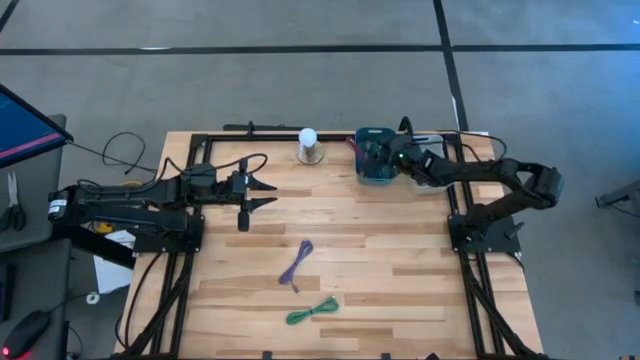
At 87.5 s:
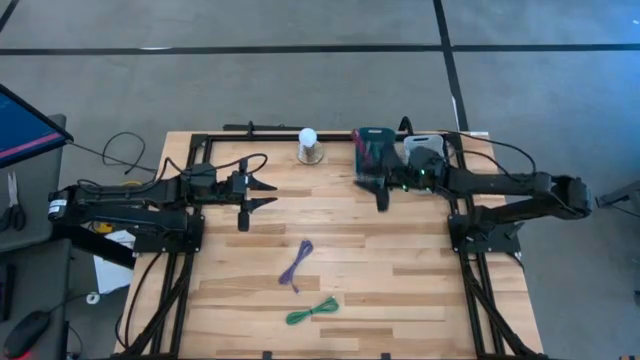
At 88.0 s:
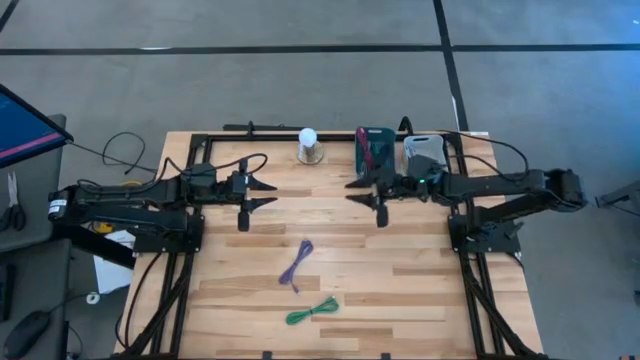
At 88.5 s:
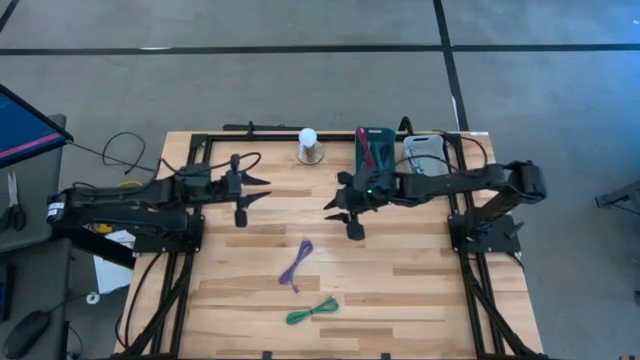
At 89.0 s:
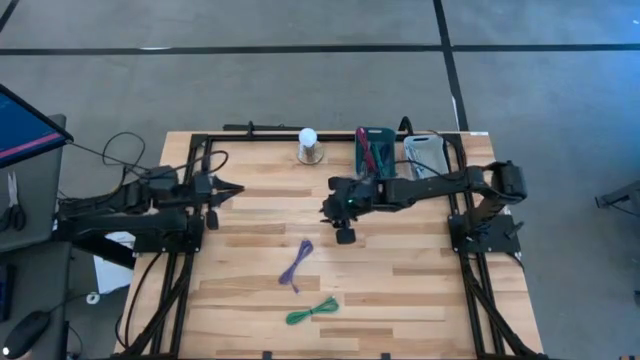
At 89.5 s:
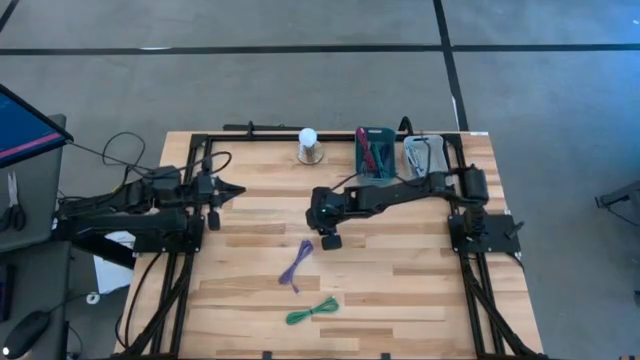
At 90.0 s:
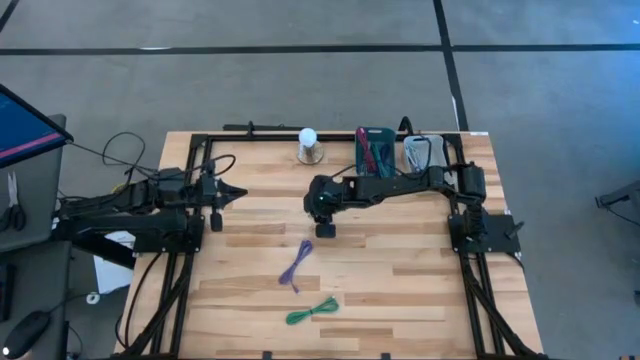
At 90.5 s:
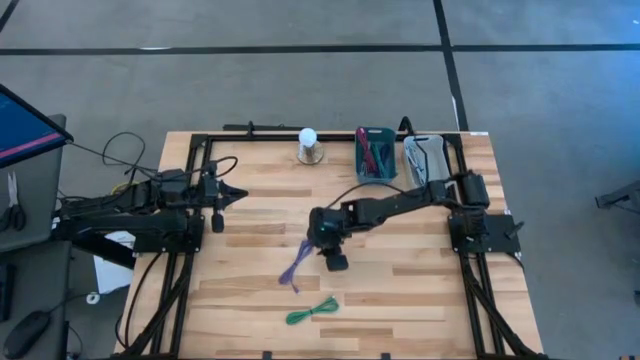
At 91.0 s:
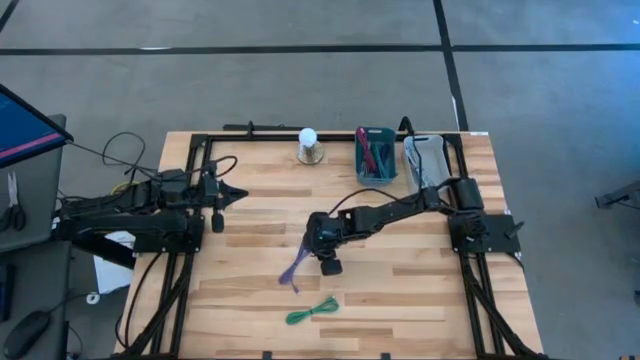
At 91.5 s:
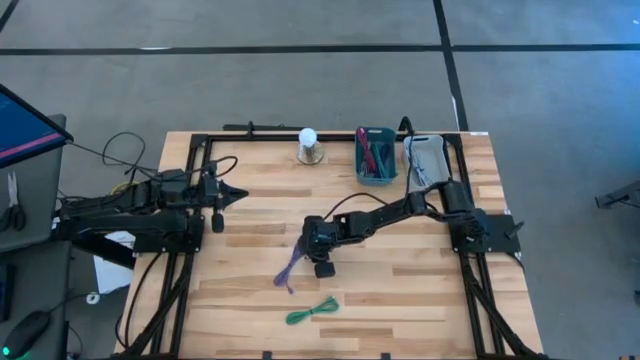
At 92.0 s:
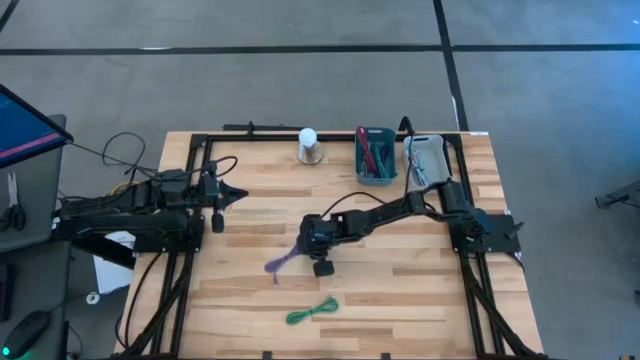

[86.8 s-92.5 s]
Task: Pick & Place USB Port
Put the purple charger cable into the gray bin

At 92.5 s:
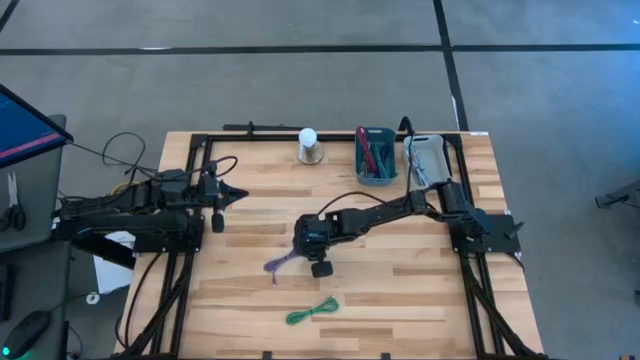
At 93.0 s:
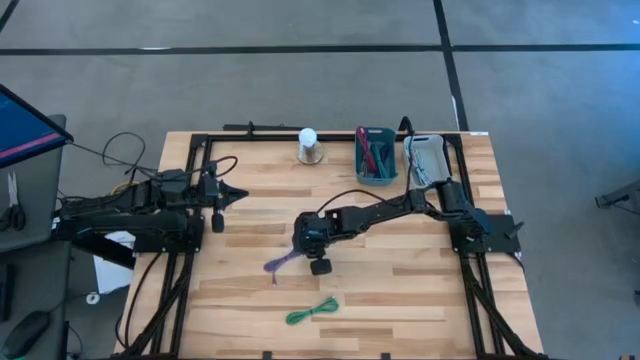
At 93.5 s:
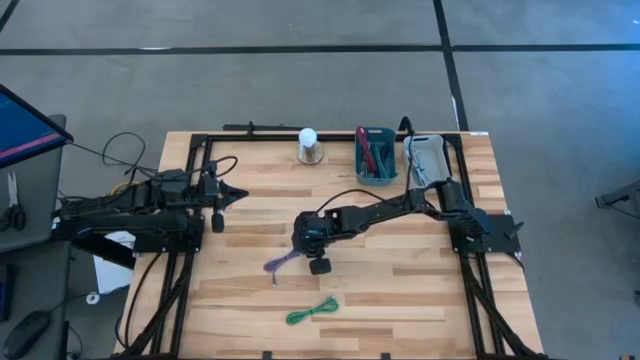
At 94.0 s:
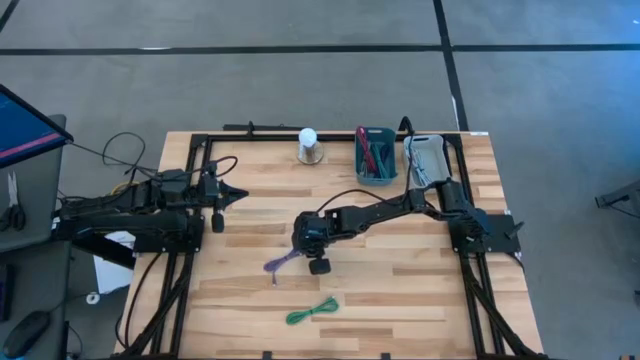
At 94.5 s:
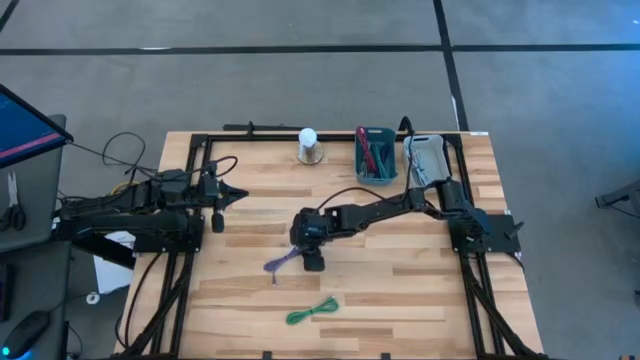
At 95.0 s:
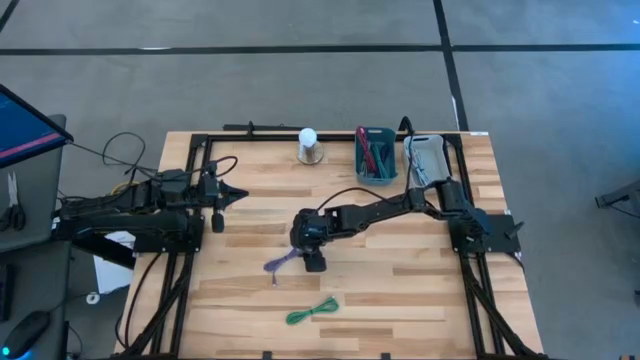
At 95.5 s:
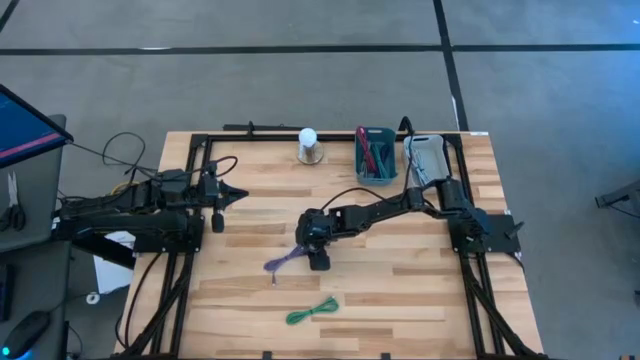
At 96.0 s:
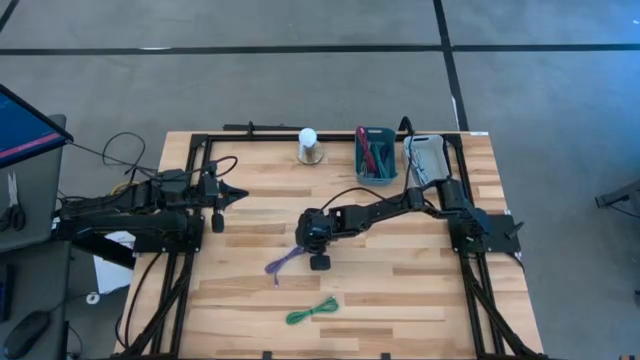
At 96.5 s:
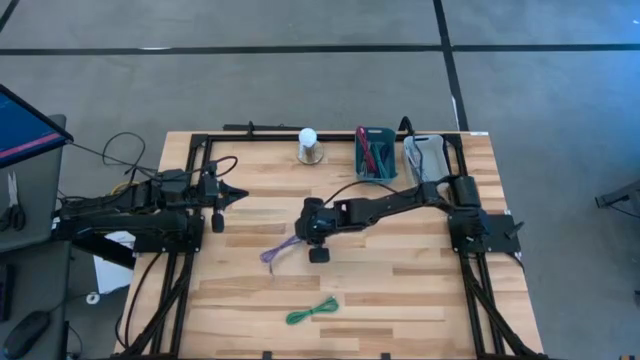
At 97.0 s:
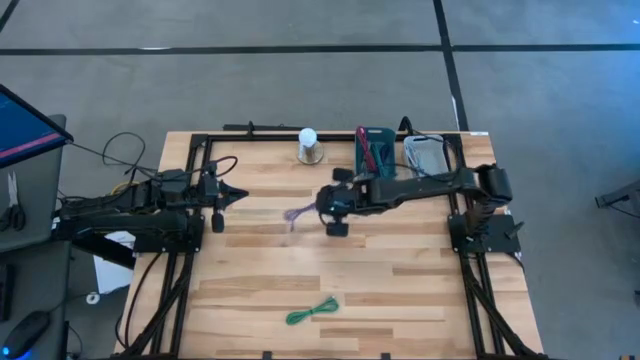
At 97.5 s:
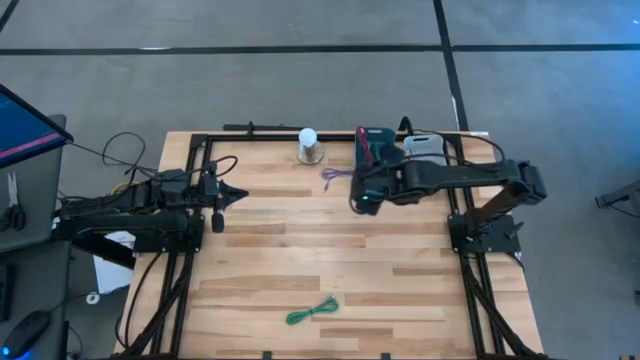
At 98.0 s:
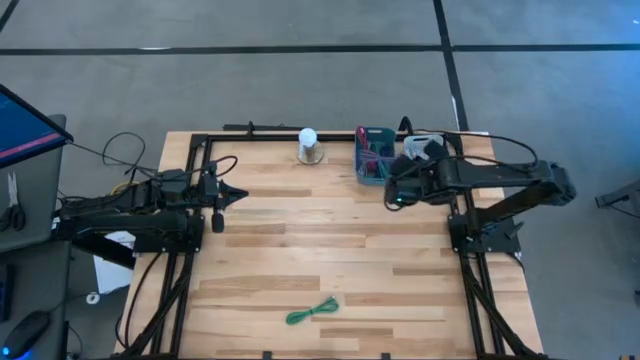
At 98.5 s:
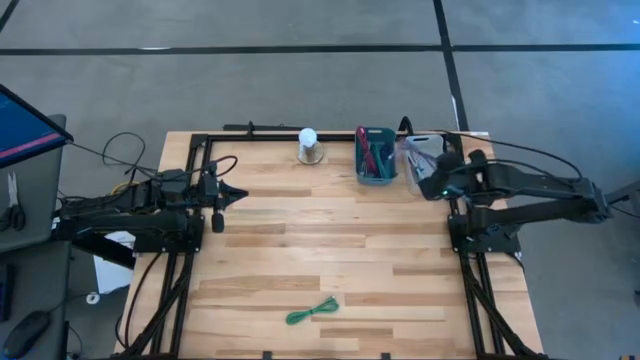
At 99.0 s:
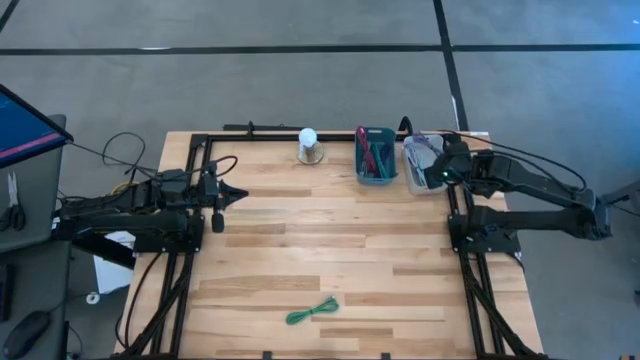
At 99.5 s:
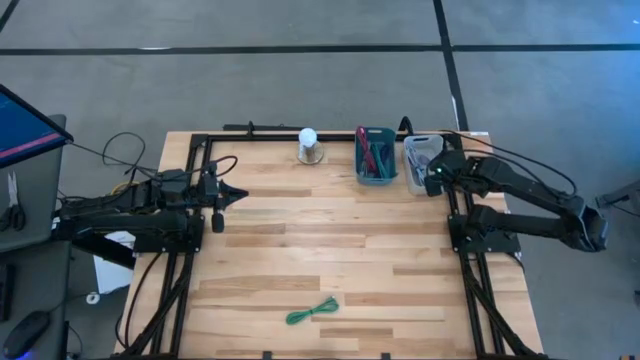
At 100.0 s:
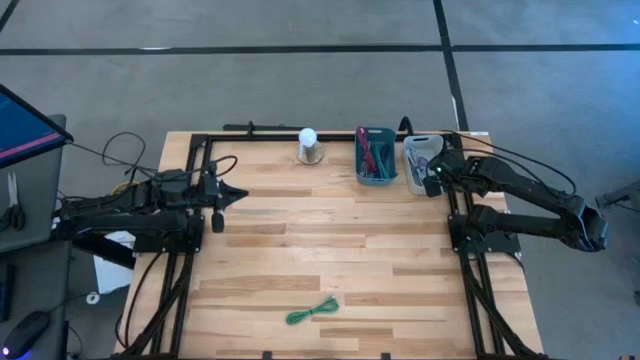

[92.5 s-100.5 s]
Put the purple charger cable into the gray bin

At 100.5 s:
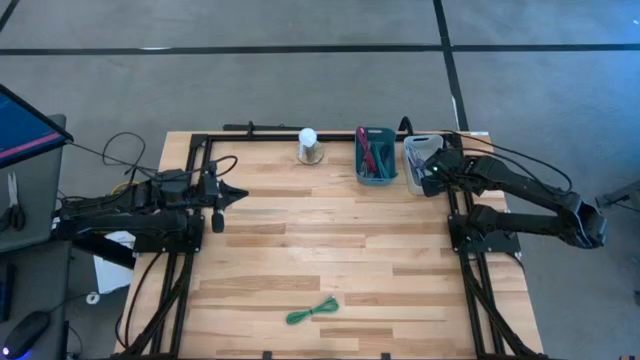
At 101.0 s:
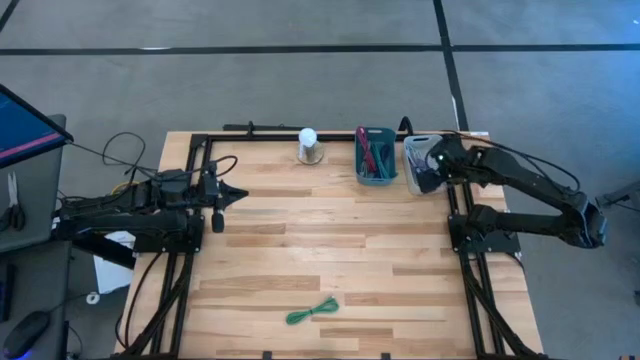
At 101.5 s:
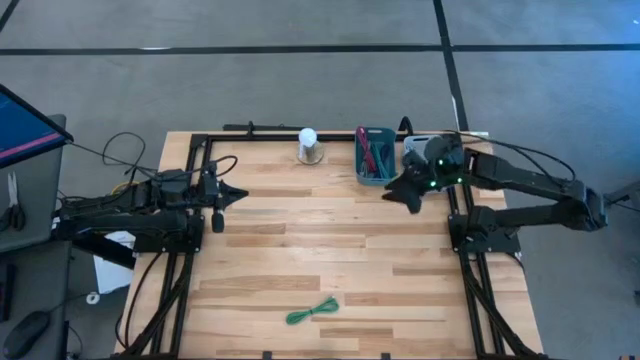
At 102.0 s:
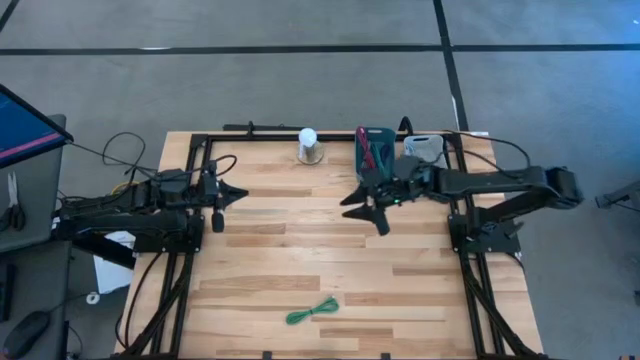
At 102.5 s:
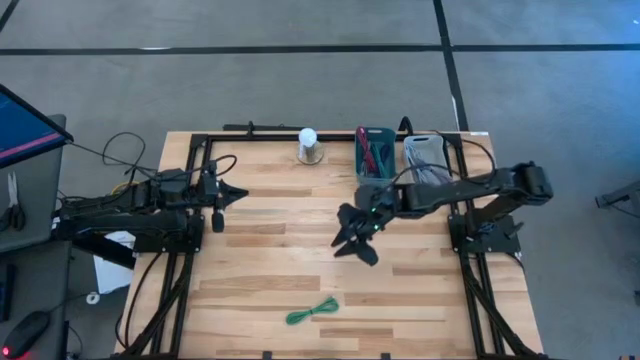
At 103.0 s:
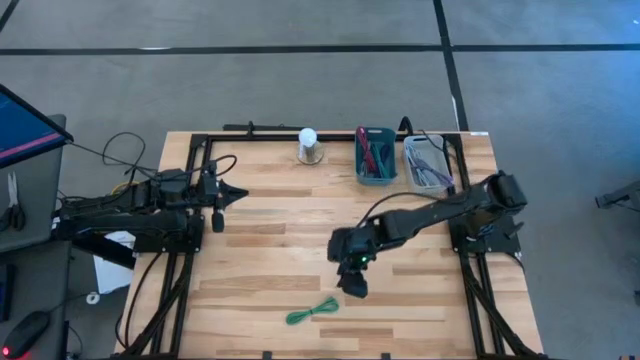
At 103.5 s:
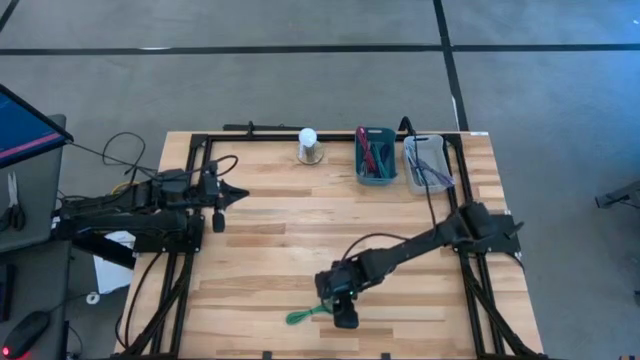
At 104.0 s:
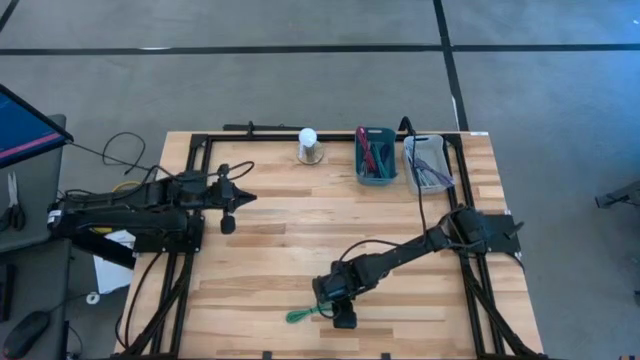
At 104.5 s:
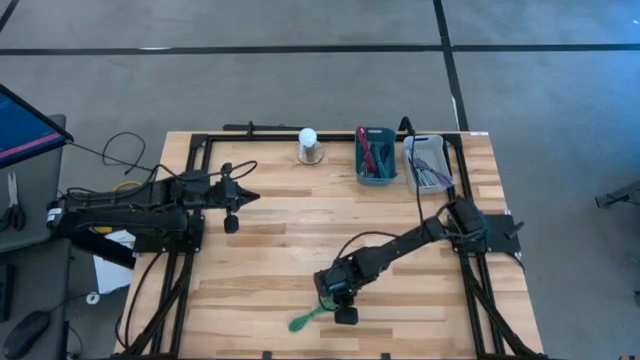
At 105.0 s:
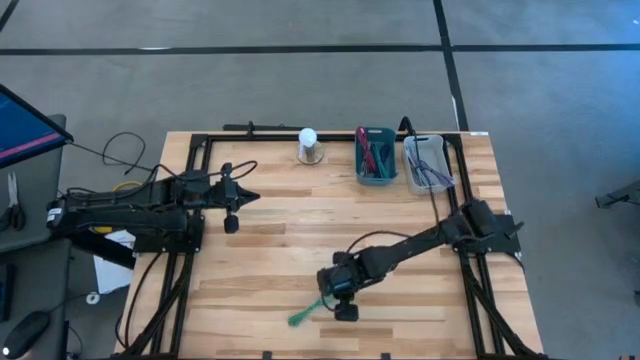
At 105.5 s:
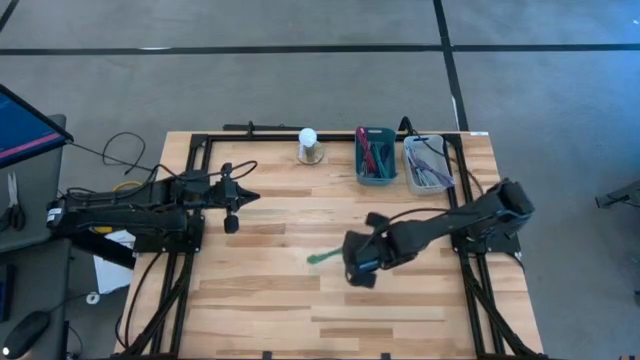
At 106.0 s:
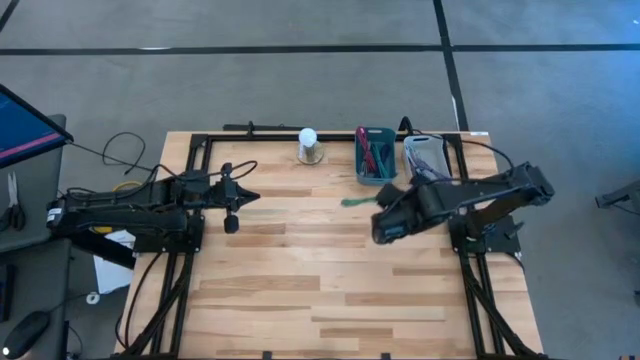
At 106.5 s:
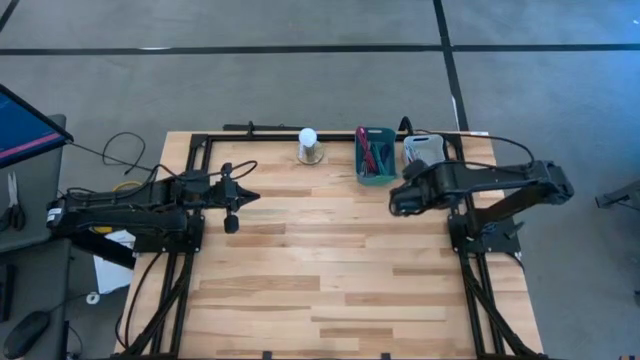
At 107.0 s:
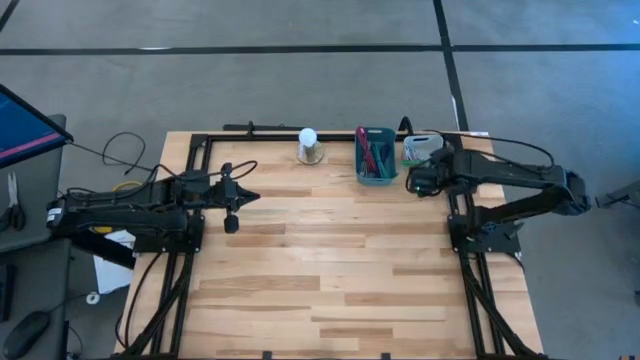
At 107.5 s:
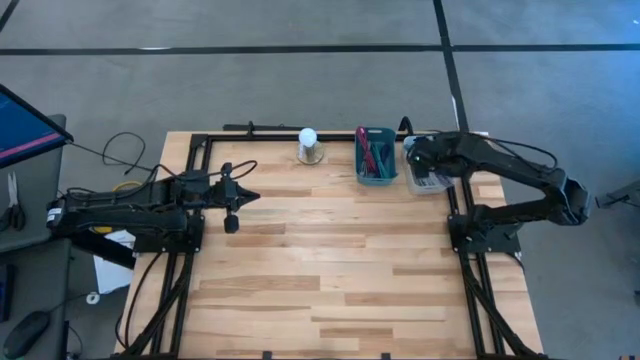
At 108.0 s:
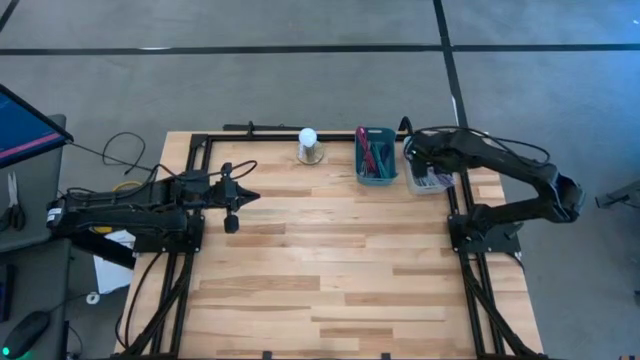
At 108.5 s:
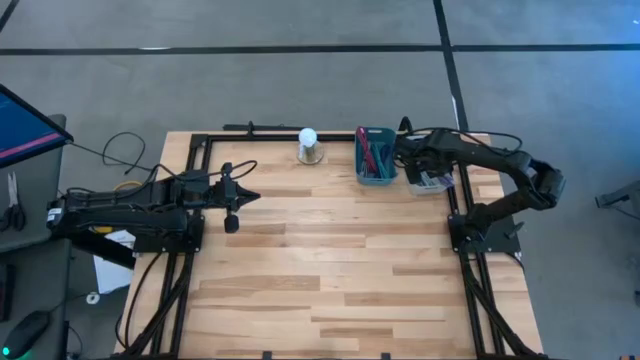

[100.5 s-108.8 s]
Put the green charger cable into the gray bin
